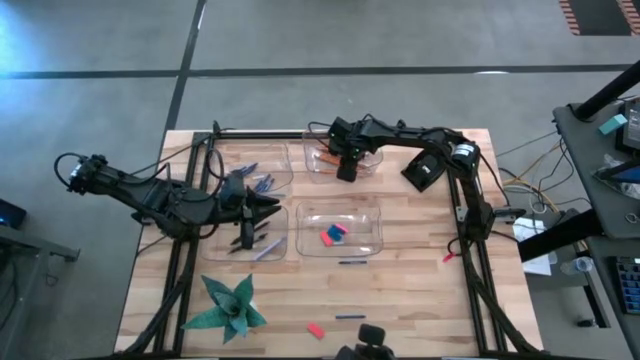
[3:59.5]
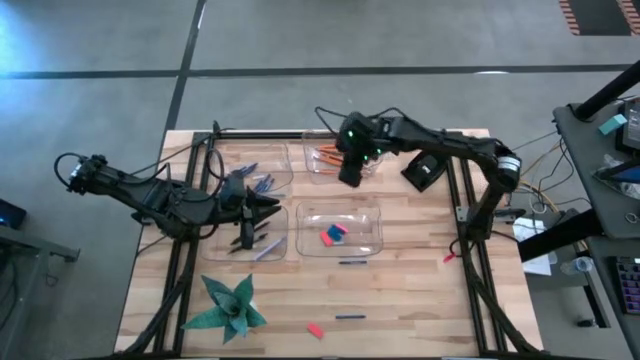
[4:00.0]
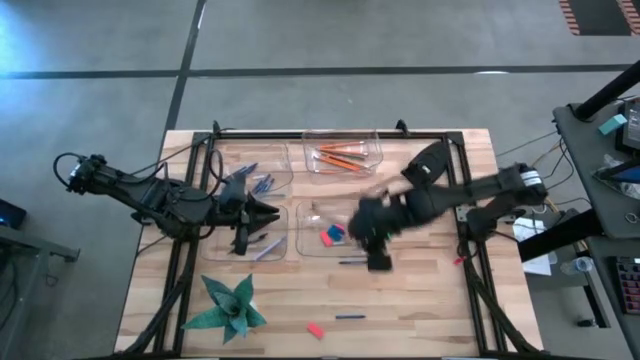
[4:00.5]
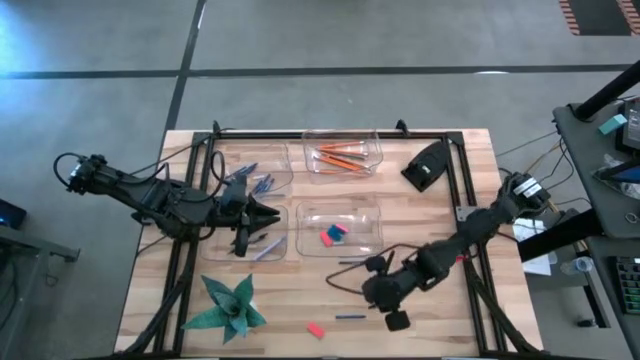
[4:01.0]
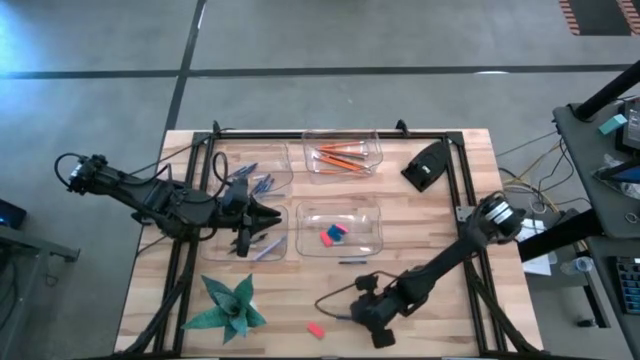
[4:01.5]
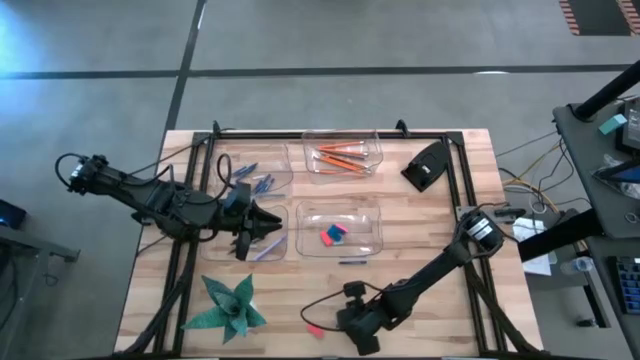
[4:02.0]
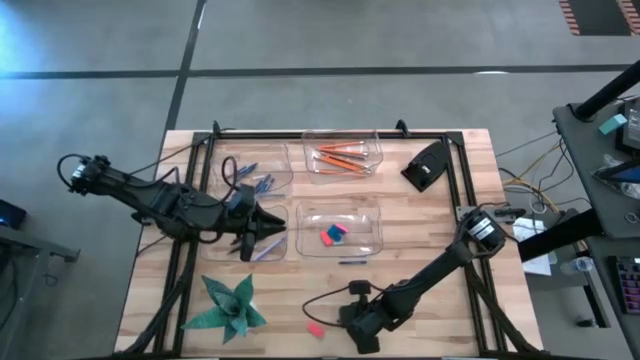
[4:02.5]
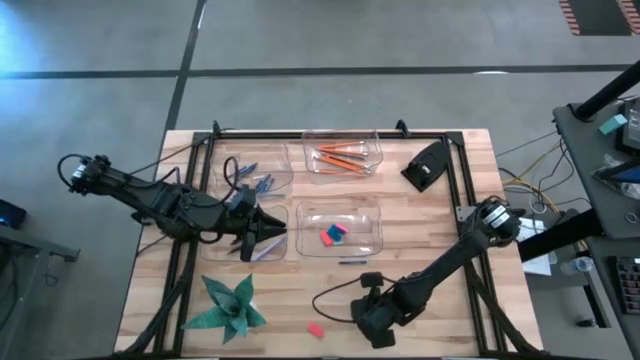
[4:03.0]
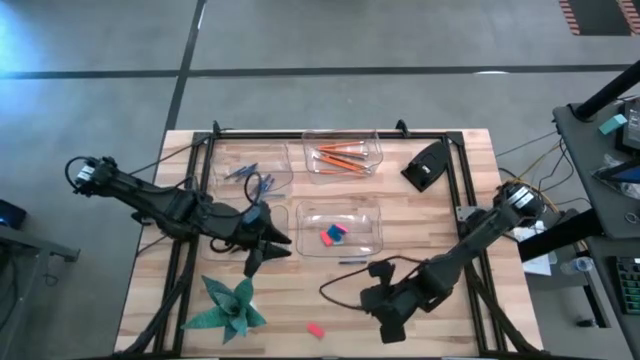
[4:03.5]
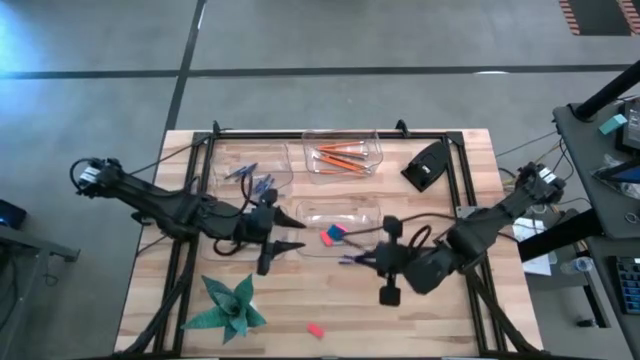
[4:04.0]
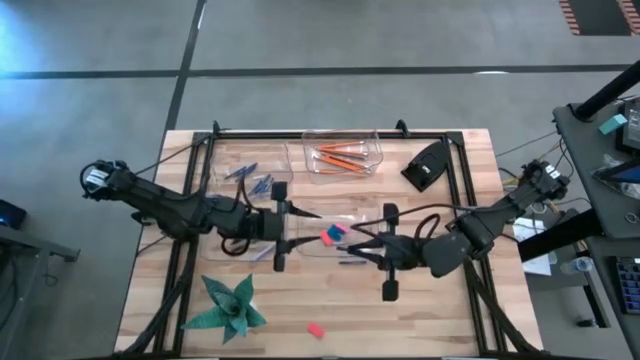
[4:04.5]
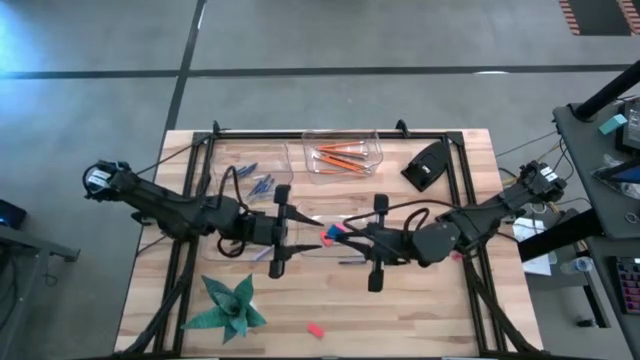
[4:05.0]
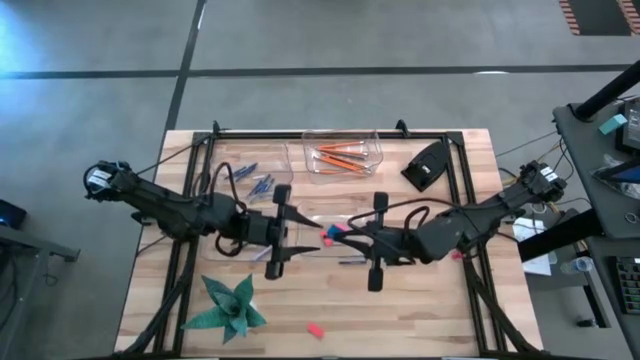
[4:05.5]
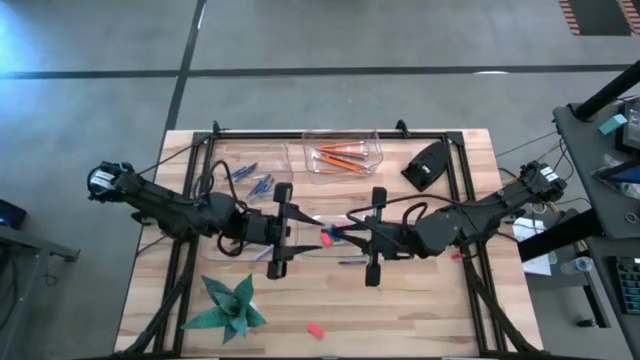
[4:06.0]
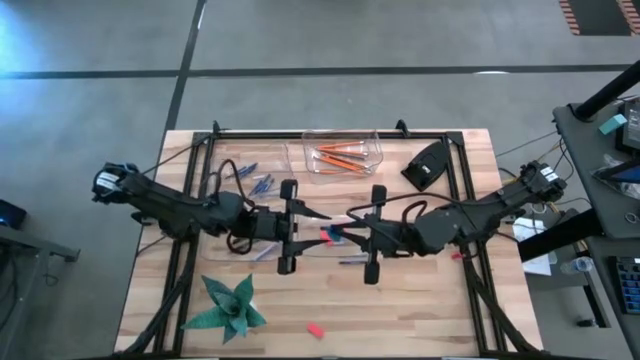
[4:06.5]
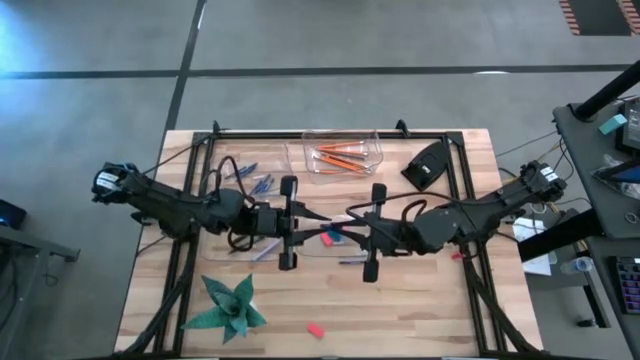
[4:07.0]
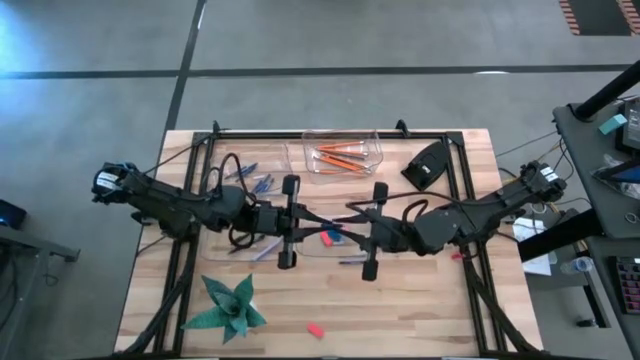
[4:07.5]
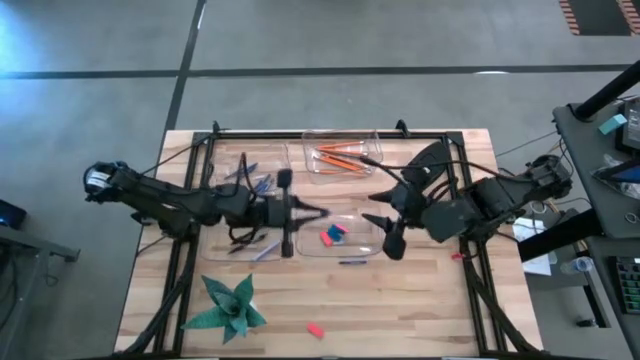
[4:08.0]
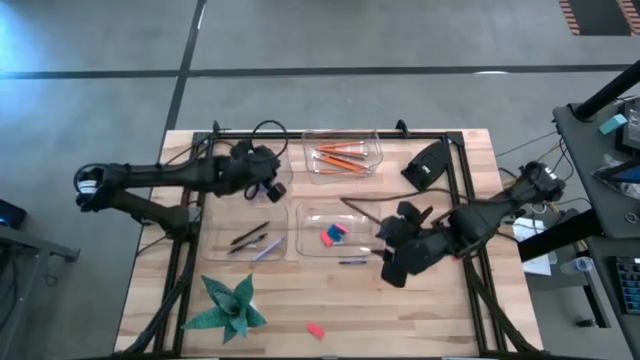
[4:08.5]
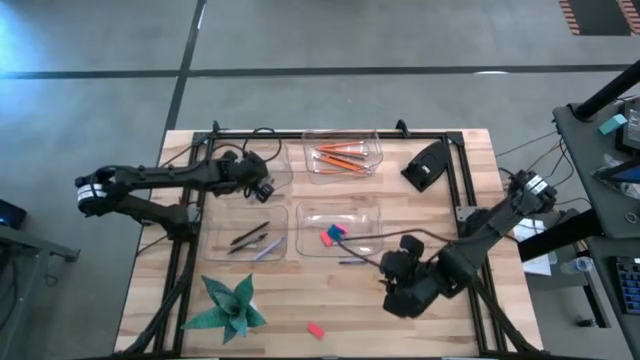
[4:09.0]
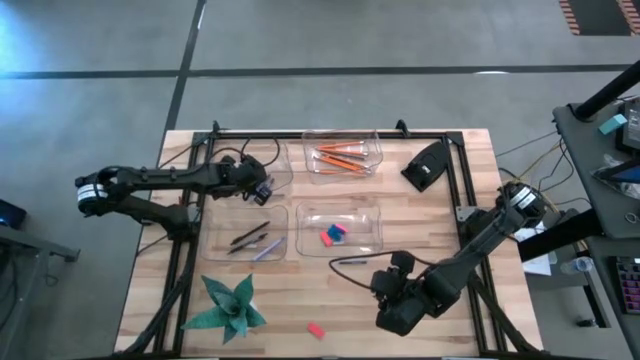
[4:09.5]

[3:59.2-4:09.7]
Task: Sort crayons/erasers/pens/pencils in bins
Put the blue crayon into the top left transparent bin

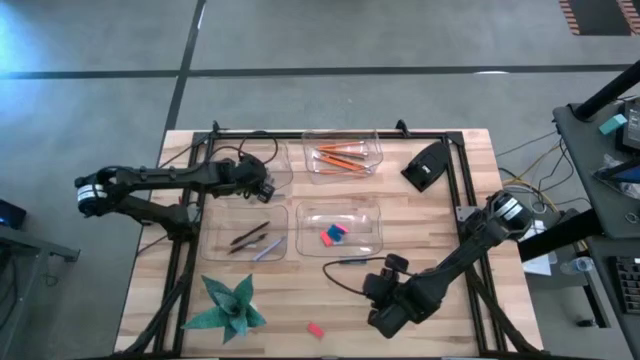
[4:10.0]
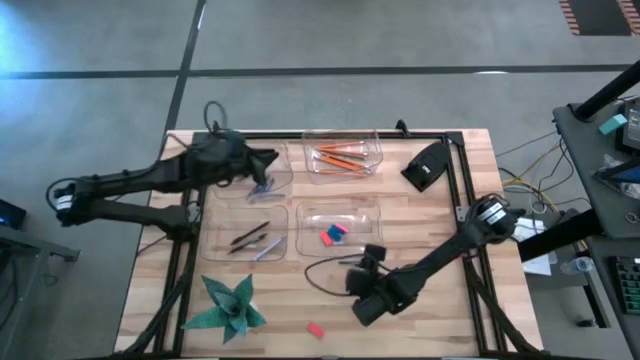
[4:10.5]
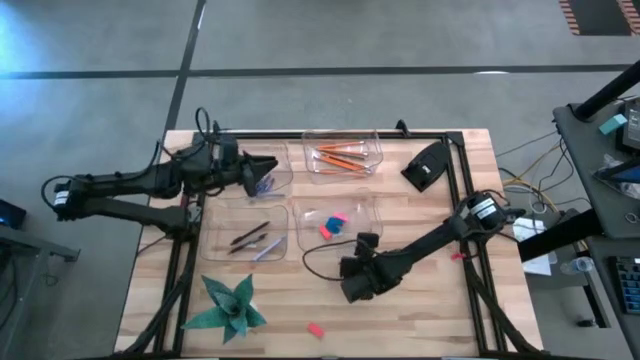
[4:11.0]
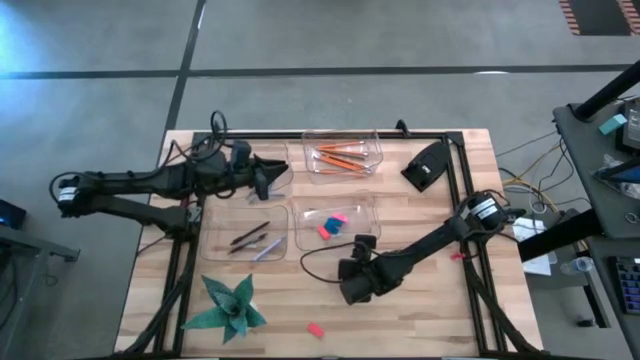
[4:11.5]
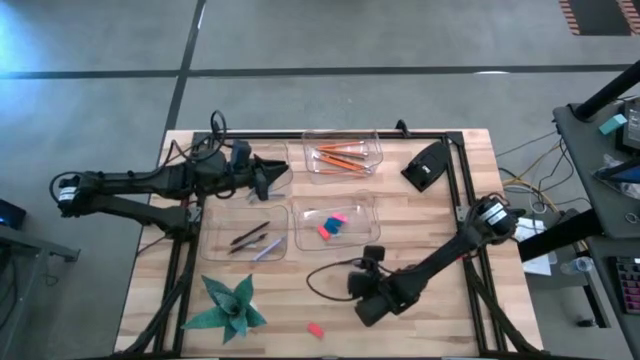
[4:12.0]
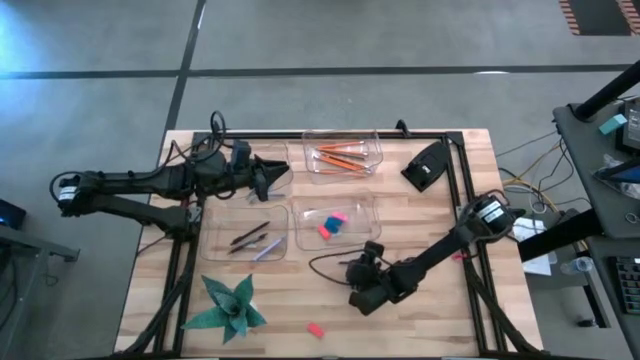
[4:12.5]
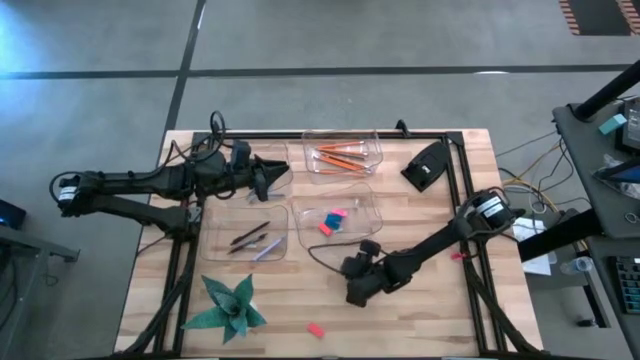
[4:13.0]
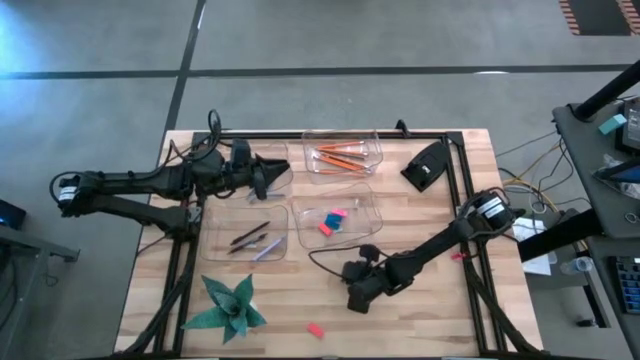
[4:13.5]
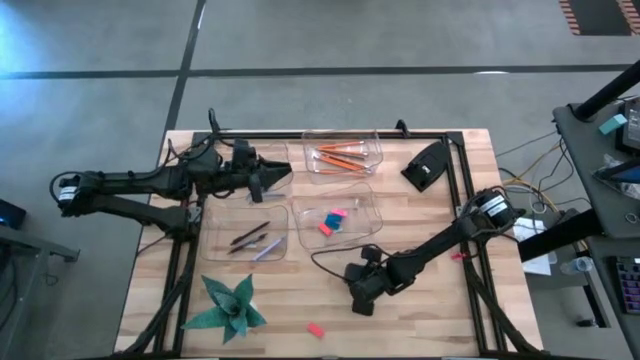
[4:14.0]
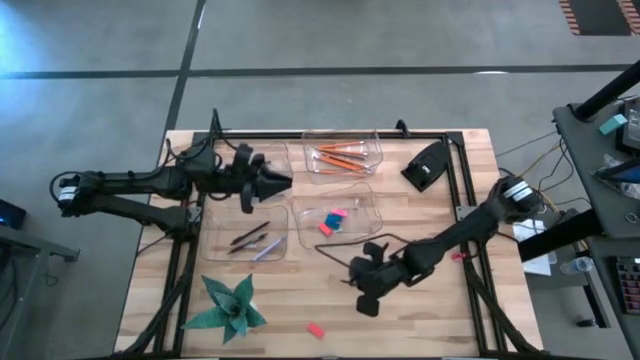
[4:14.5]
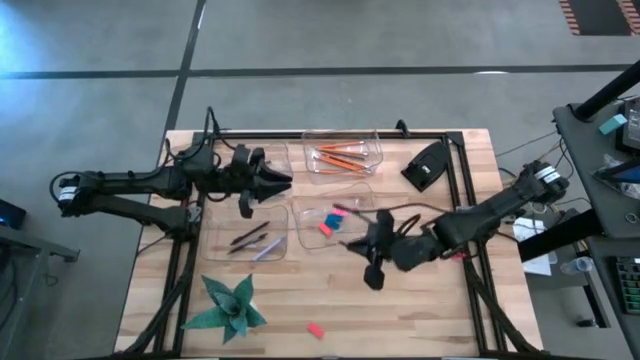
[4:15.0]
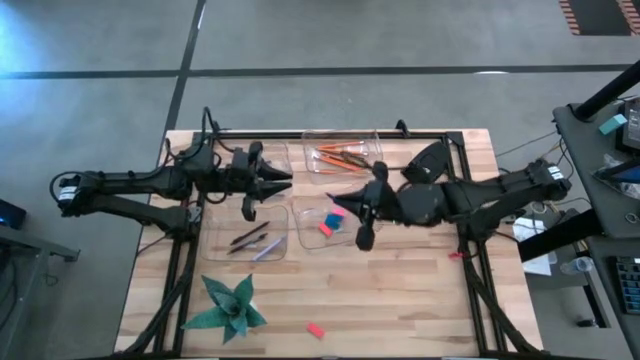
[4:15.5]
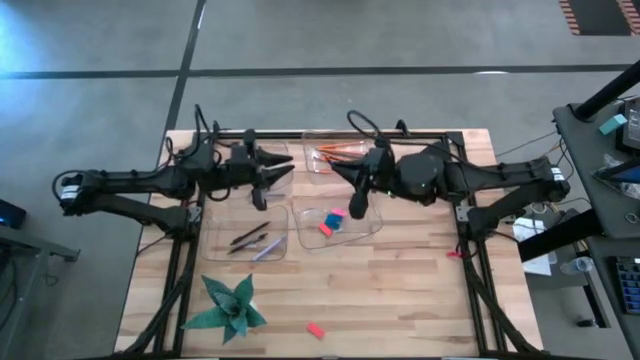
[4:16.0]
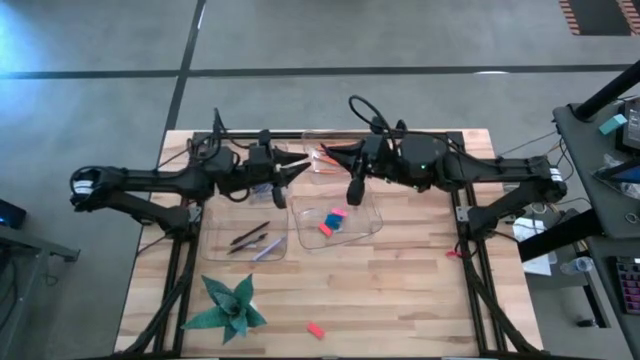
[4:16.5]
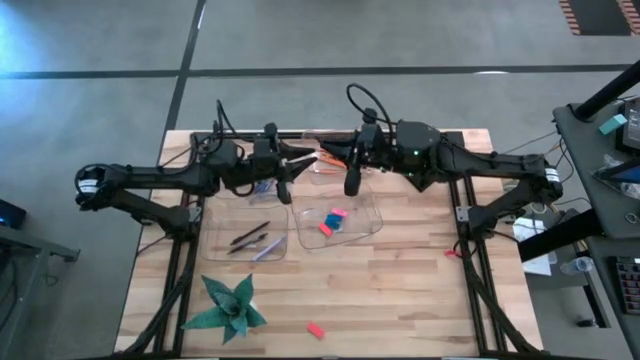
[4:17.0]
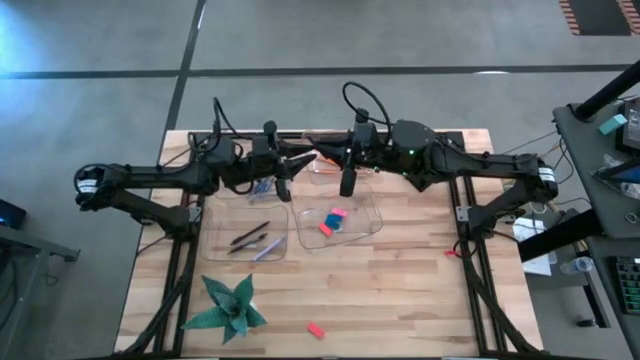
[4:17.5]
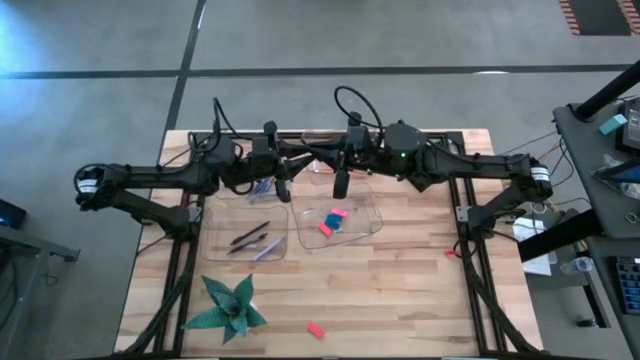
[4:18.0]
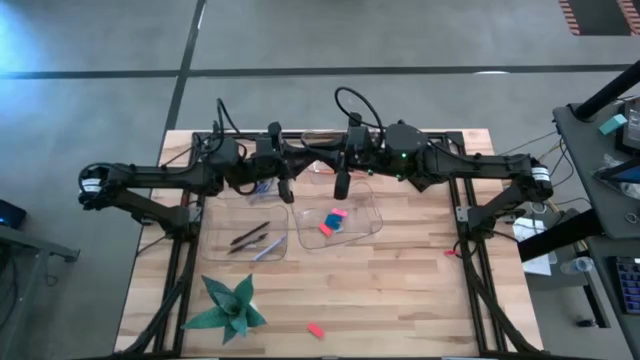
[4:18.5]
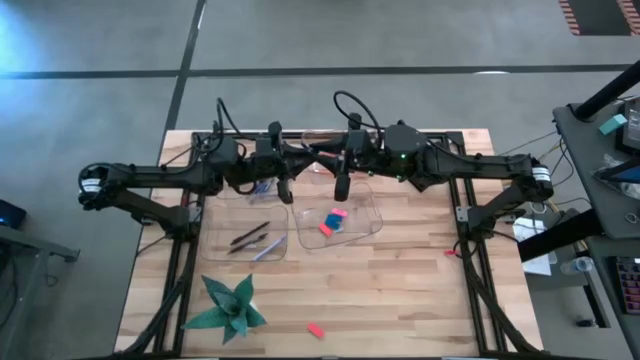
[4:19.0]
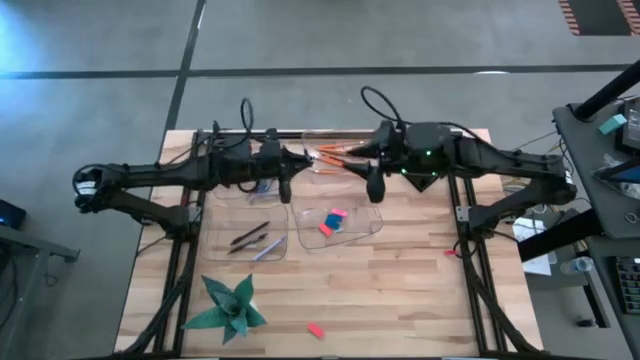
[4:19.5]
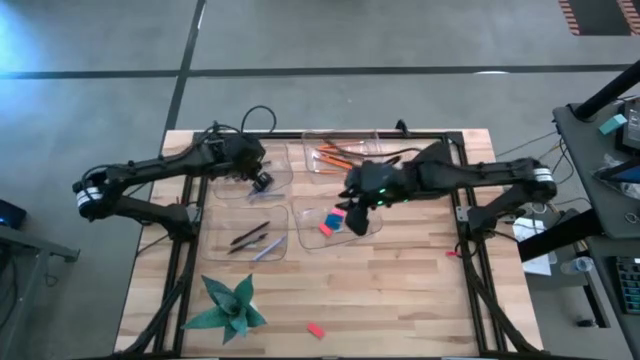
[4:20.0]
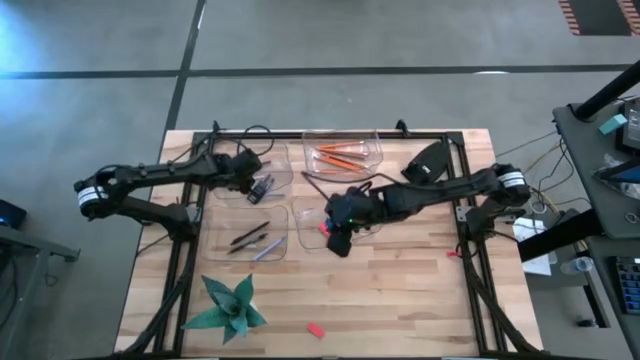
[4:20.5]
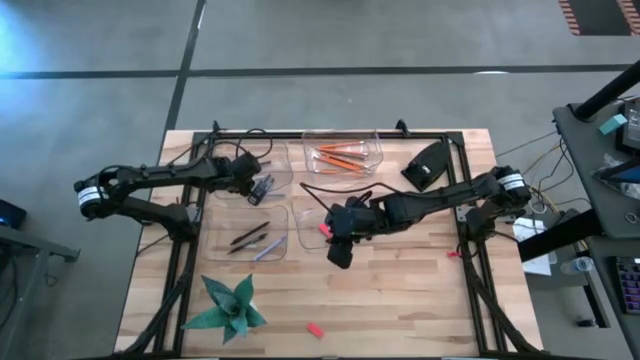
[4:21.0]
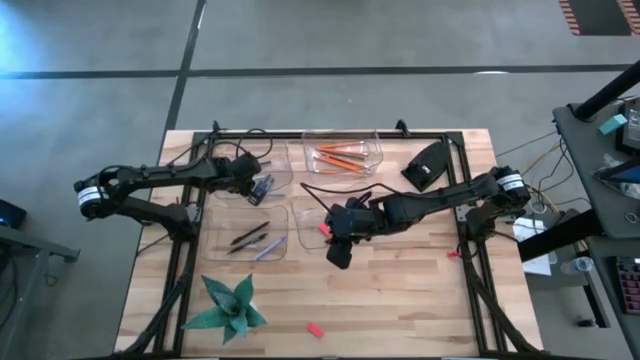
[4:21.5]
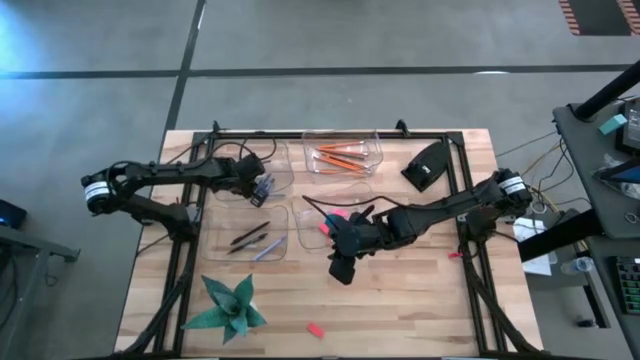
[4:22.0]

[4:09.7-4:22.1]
Put the blue crayon into the top left transparent bin
